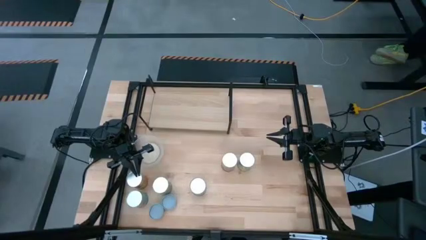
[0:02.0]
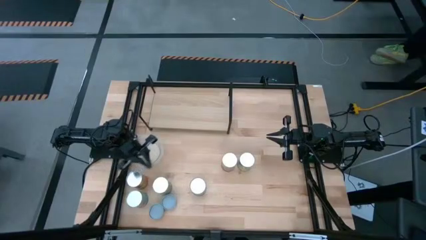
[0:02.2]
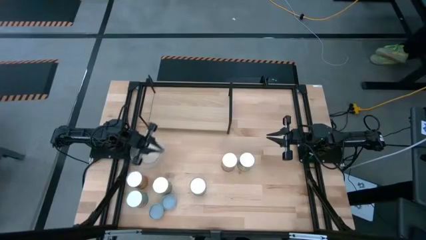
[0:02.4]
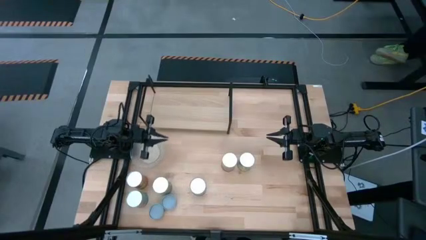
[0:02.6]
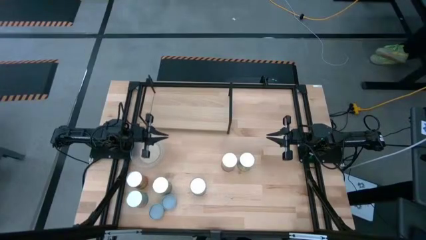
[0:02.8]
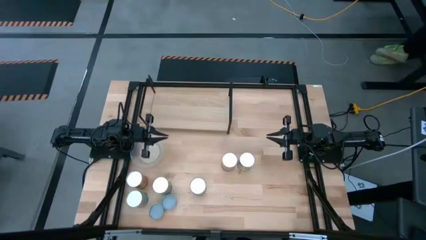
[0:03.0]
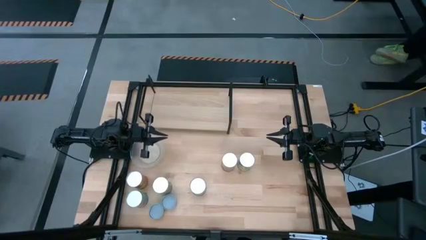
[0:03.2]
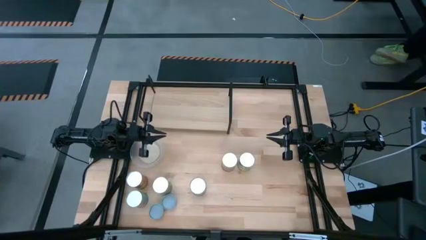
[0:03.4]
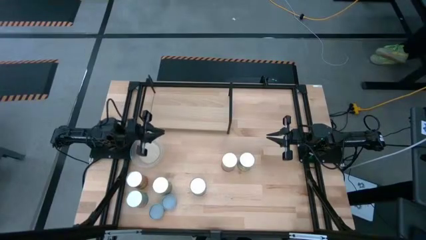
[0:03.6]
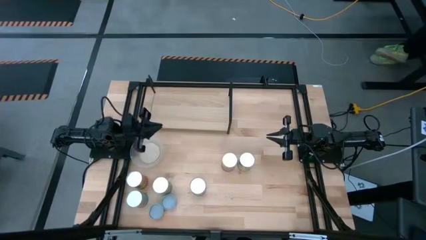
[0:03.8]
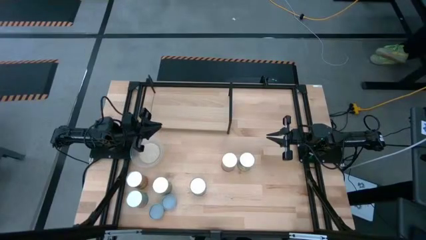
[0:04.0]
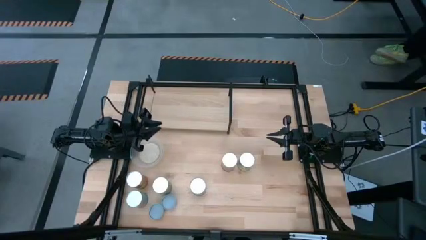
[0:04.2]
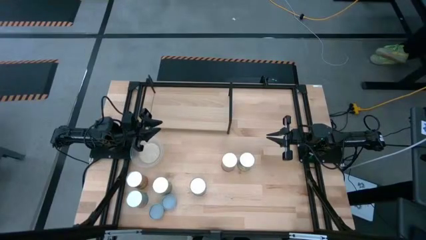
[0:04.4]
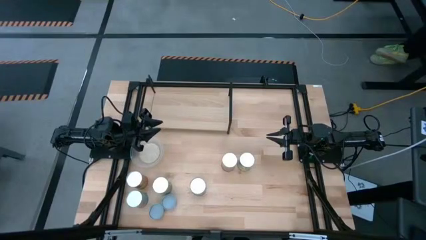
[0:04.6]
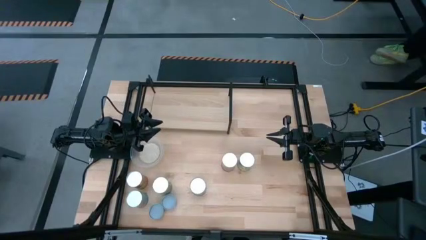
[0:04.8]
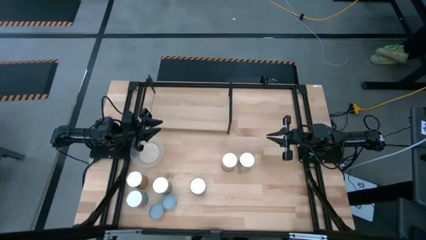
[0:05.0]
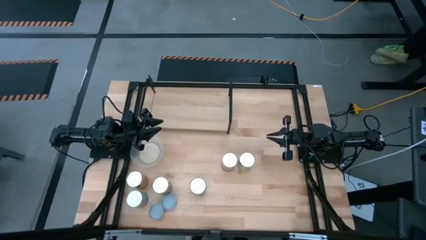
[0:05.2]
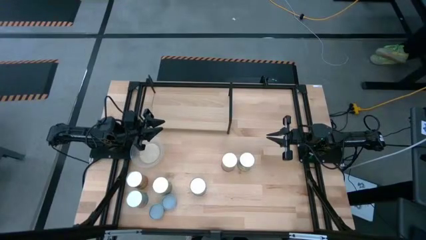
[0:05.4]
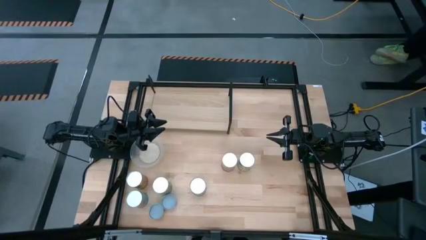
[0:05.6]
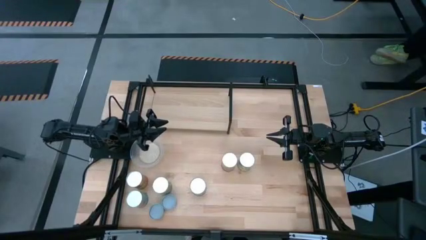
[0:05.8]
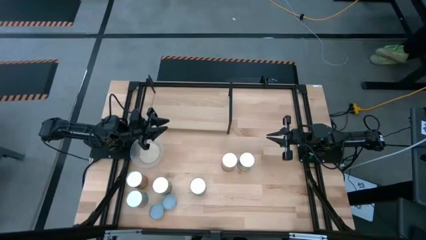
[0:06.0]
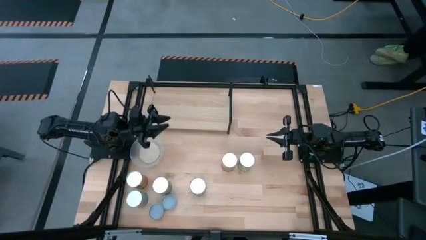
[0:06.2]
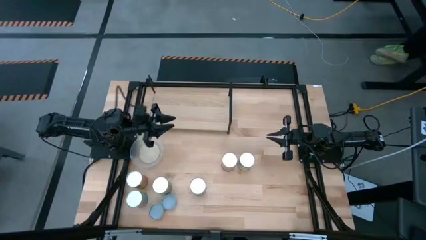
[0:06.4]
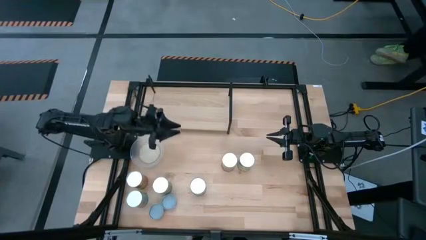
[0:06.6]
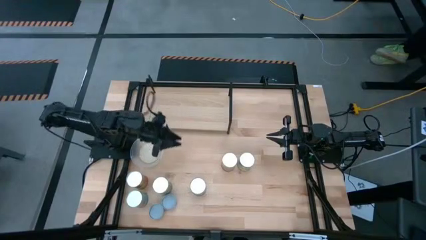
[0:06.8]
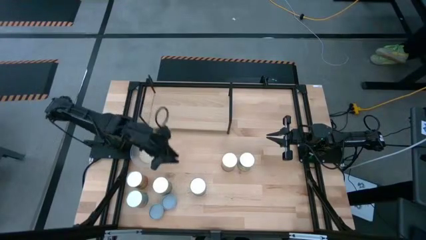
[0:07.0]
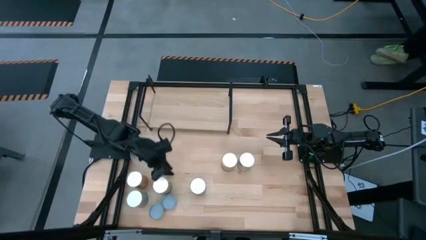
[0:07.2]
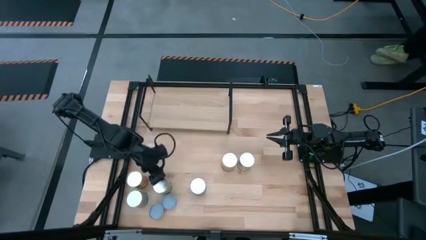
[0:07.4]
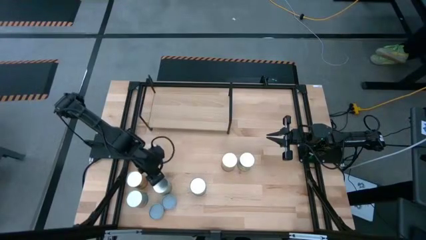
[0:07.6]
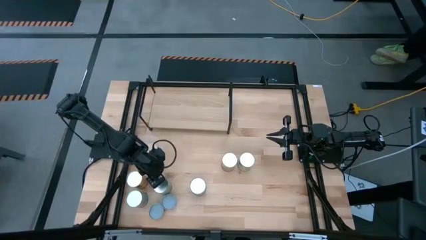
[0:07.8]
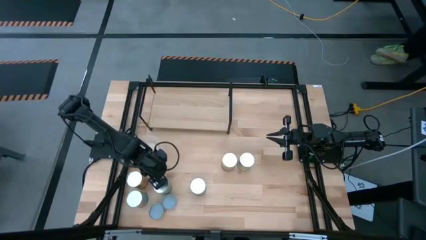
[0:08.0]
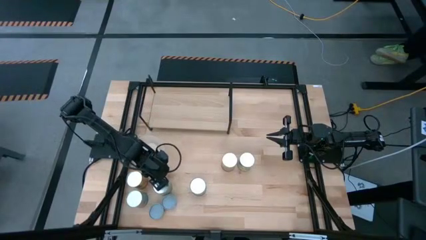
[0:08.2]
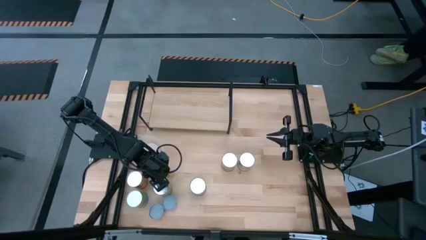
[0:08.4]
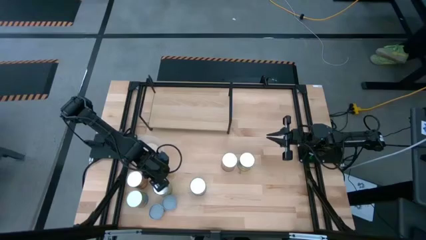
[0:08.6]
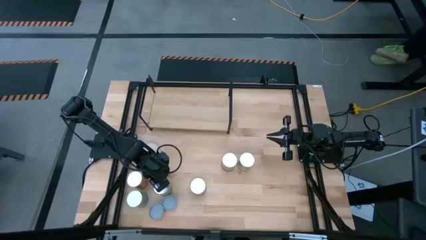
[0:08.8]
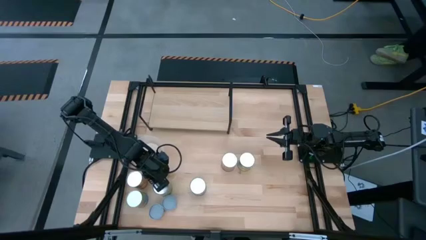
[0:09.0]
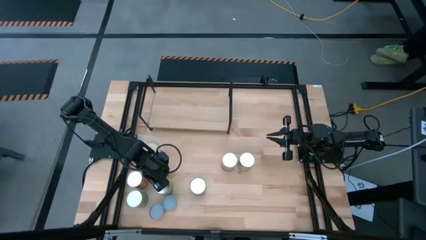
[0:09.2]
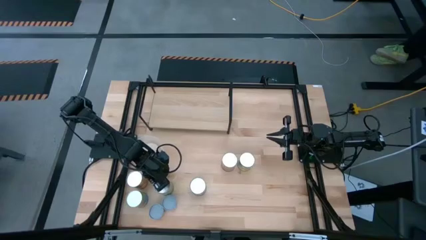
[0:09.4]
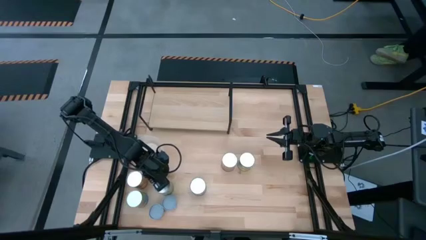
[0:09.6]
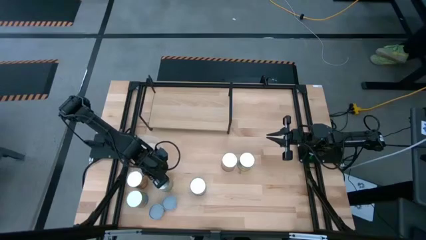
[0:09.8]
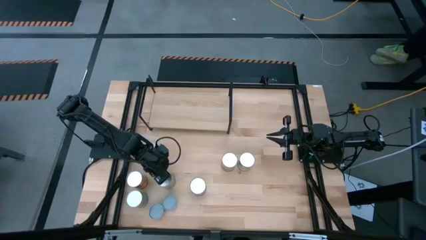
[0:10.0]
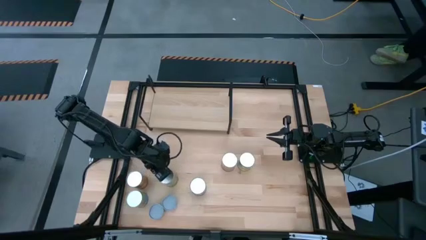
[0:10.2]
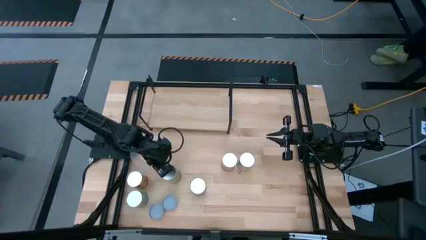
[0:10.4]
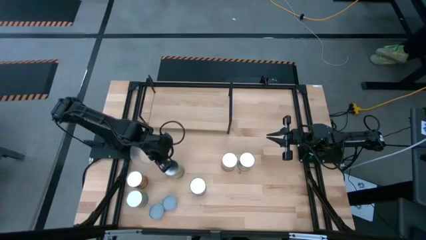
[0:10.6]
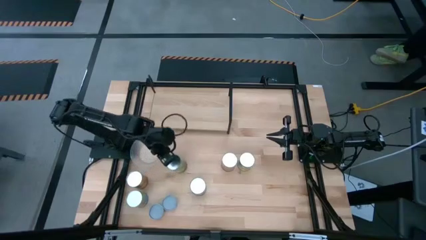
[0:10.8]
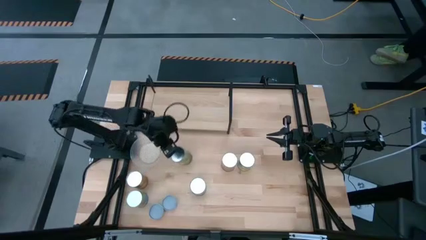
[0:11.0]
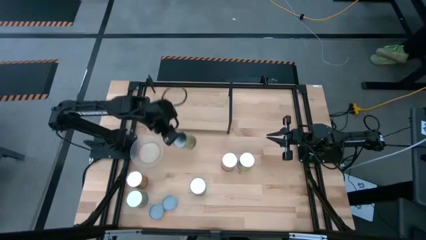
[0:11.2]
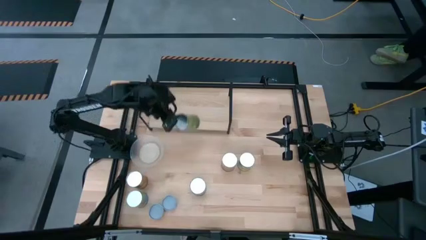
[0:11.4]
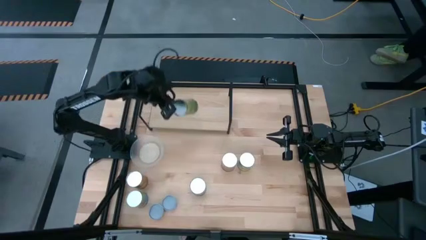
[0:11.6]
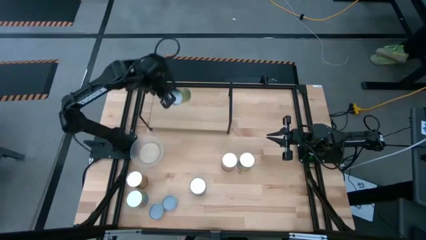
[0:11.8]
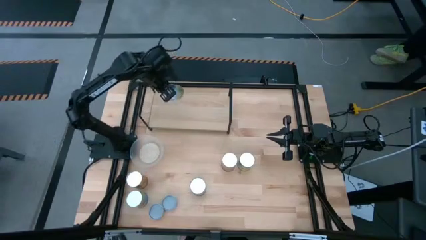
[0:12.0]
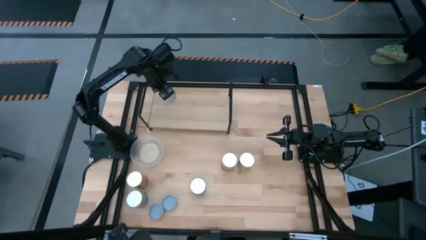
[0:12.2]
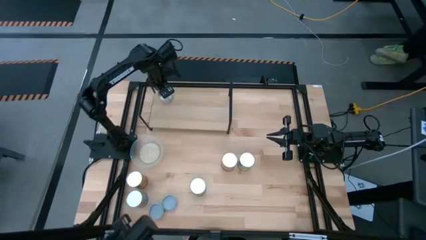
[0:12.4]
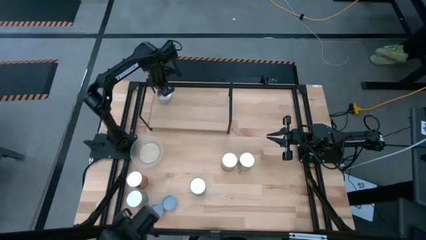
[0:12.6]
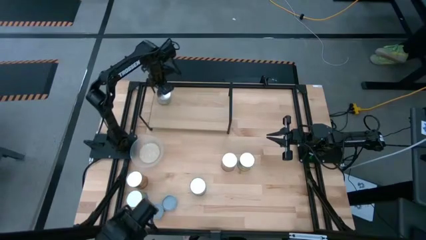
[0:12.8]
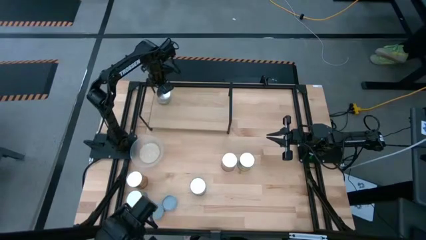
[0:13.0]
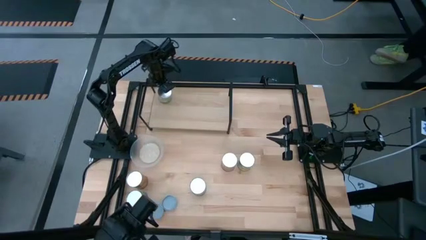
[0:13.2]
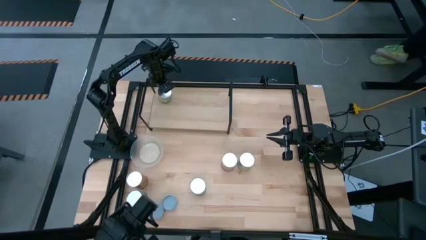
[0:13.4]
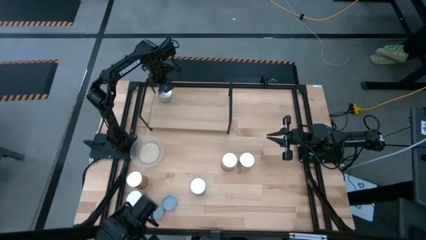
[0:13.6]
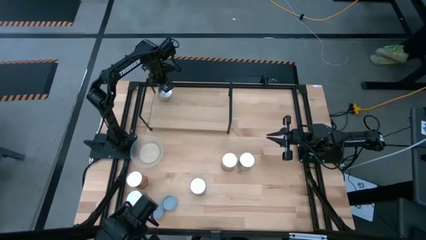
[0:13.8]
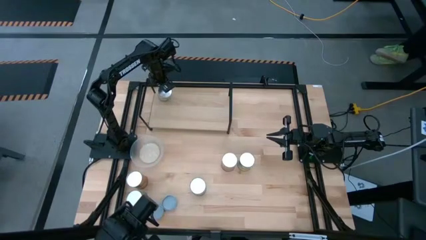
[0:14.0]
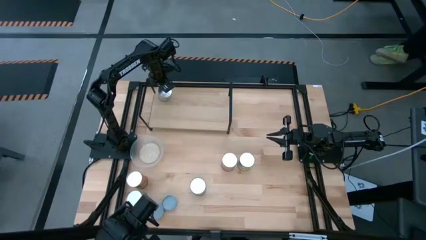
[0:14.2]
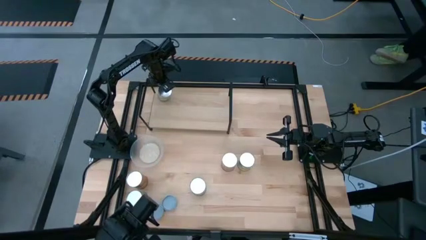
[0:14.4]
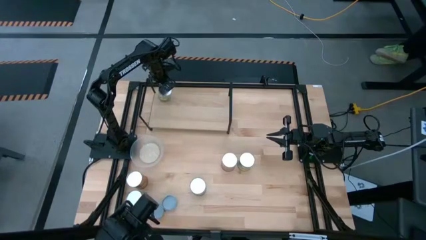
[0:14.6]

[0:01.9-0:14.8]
Task: Pick and place cans onto a shelf
Put the pears can on the shelf
